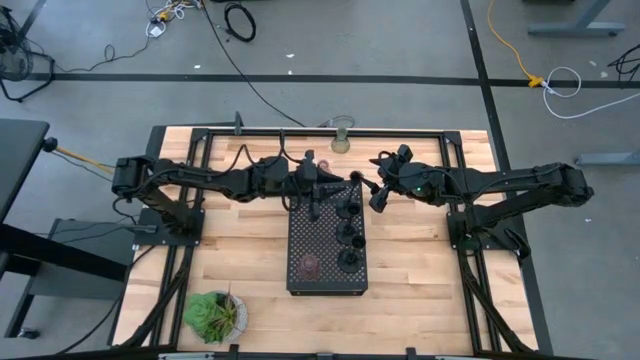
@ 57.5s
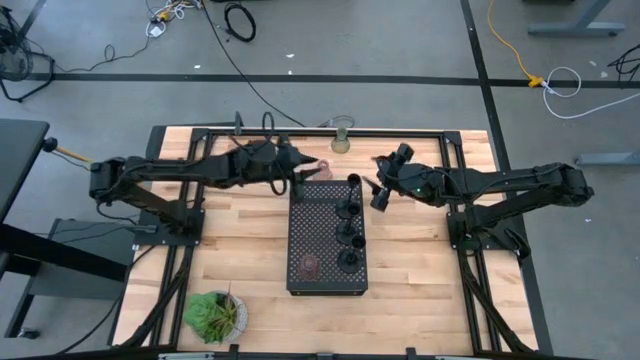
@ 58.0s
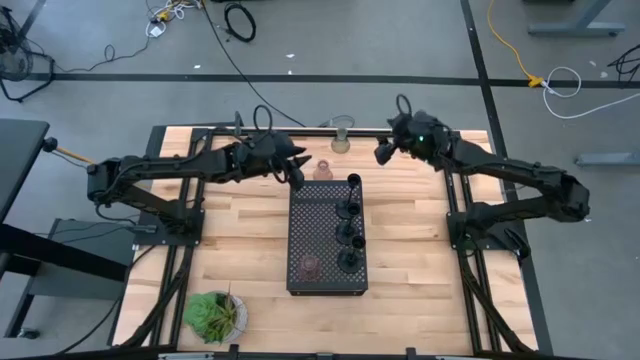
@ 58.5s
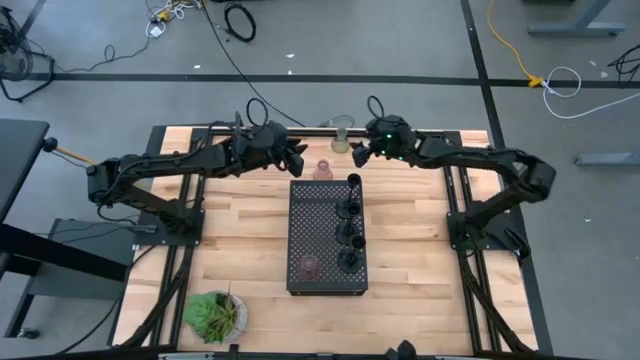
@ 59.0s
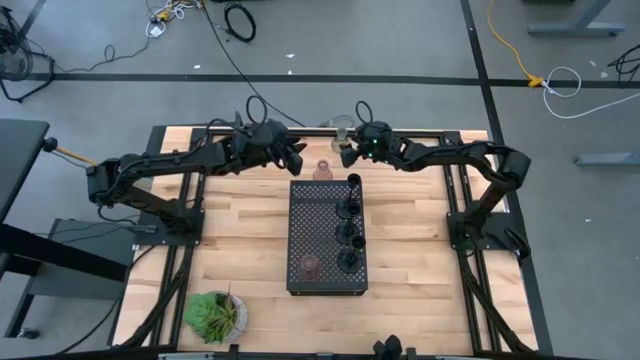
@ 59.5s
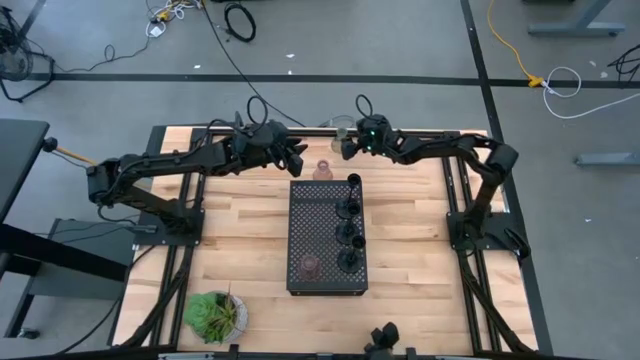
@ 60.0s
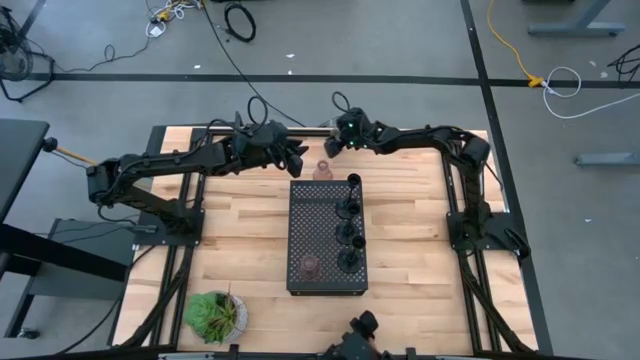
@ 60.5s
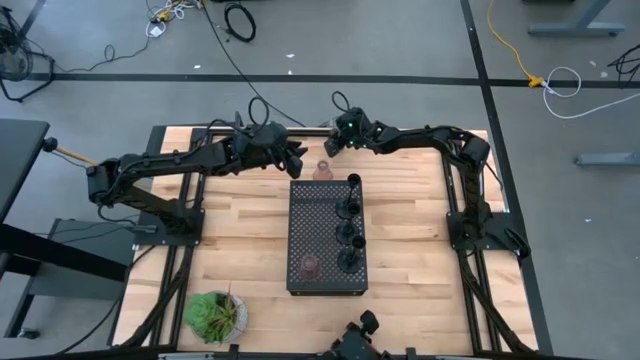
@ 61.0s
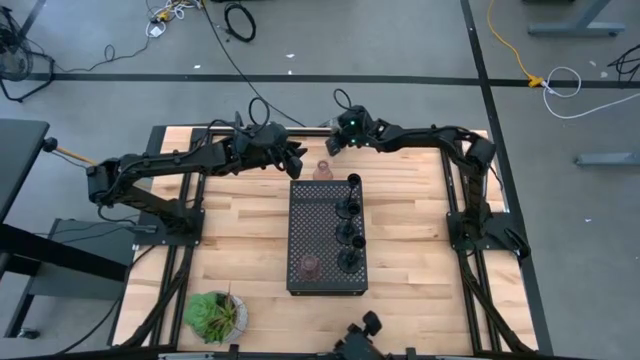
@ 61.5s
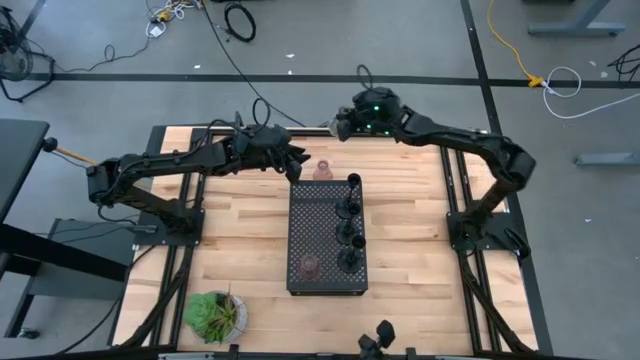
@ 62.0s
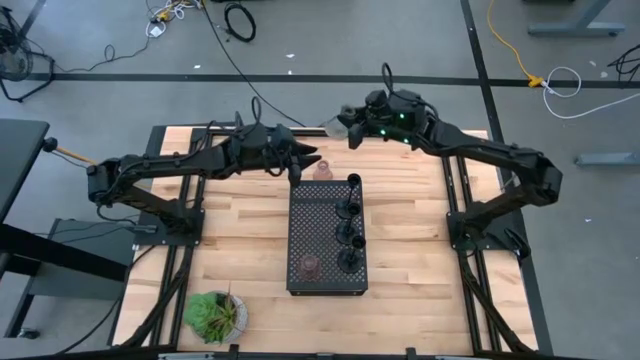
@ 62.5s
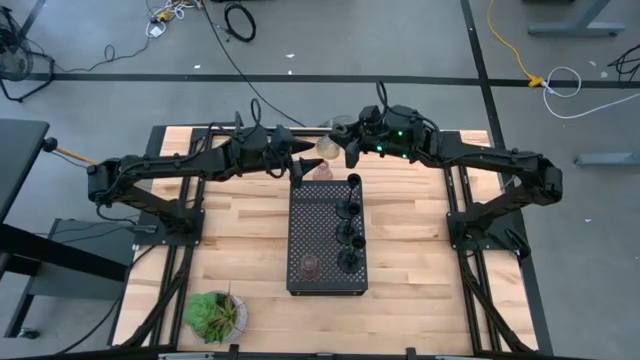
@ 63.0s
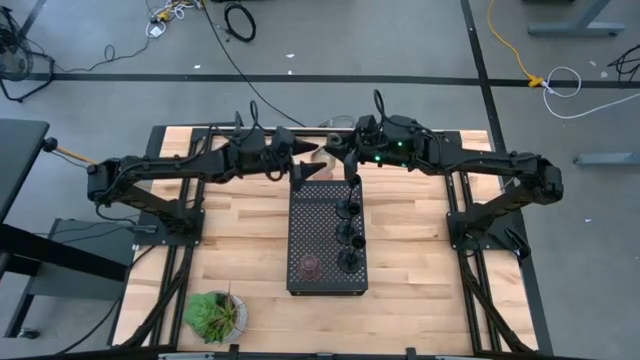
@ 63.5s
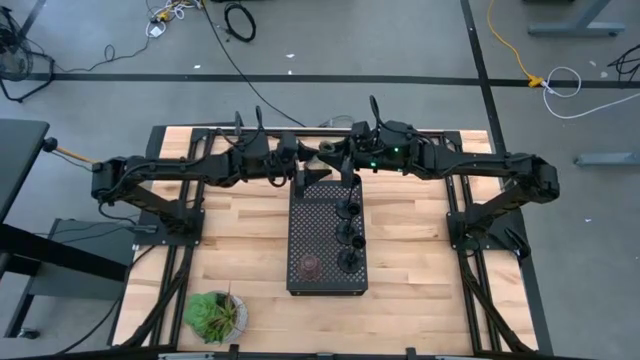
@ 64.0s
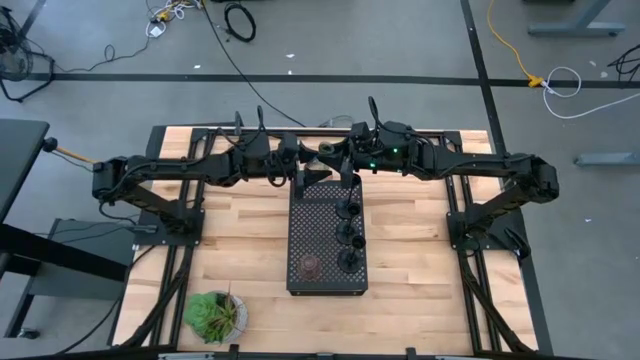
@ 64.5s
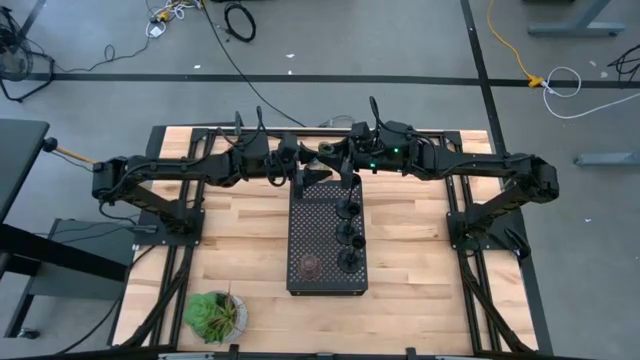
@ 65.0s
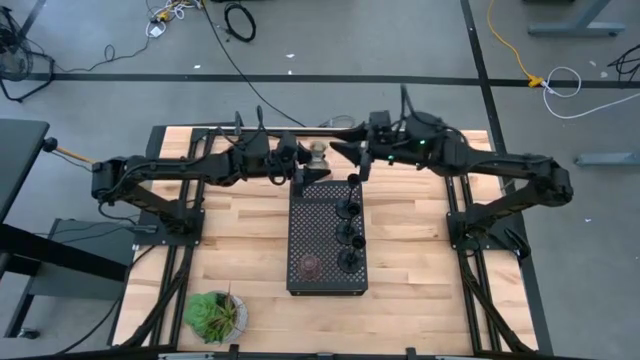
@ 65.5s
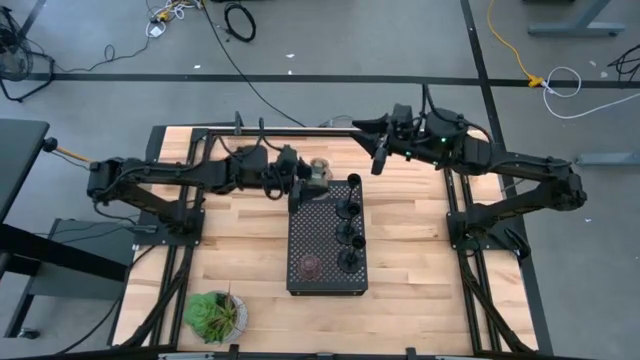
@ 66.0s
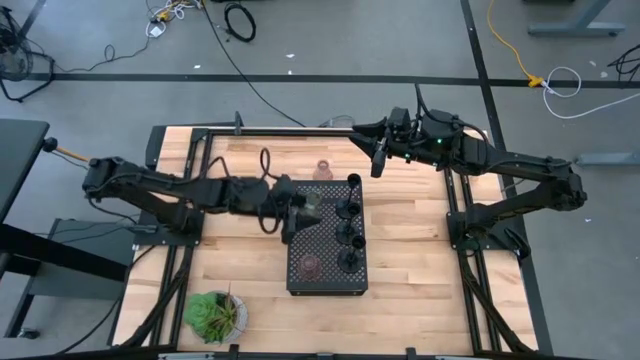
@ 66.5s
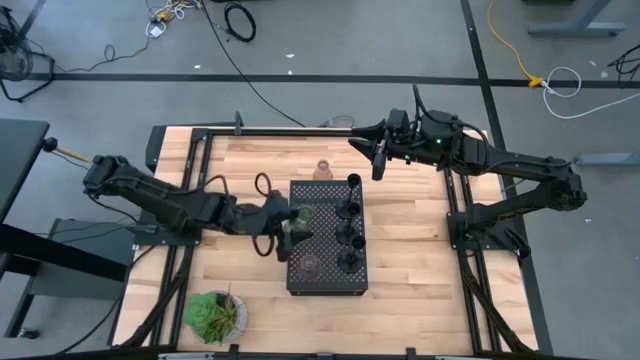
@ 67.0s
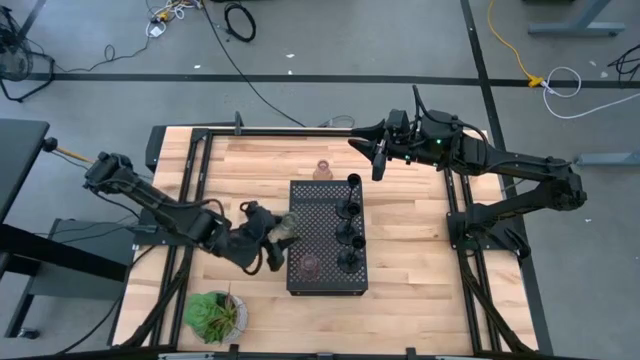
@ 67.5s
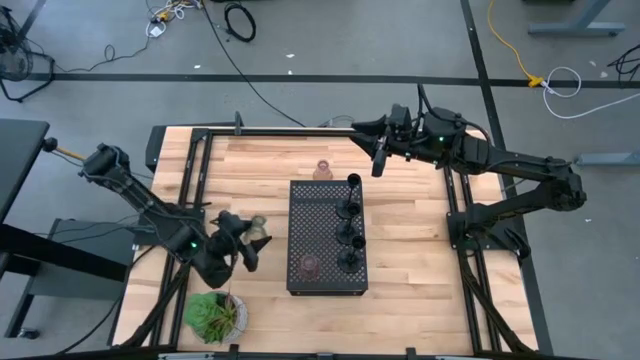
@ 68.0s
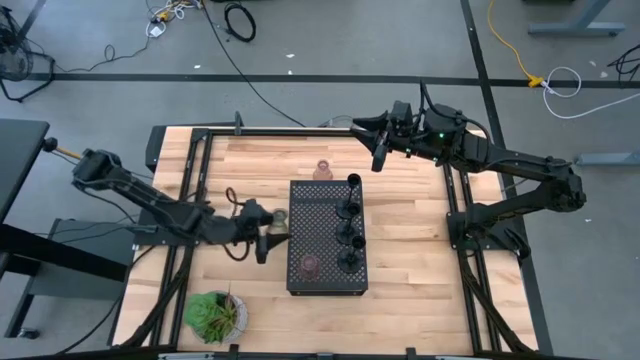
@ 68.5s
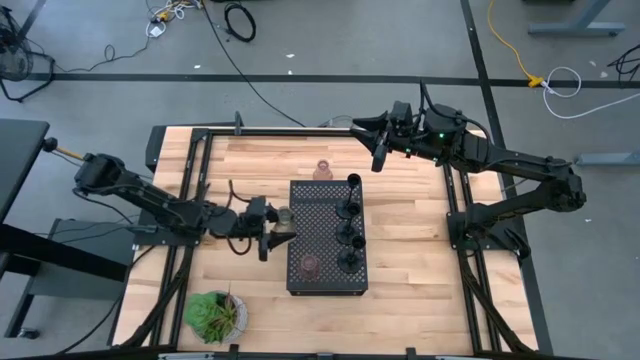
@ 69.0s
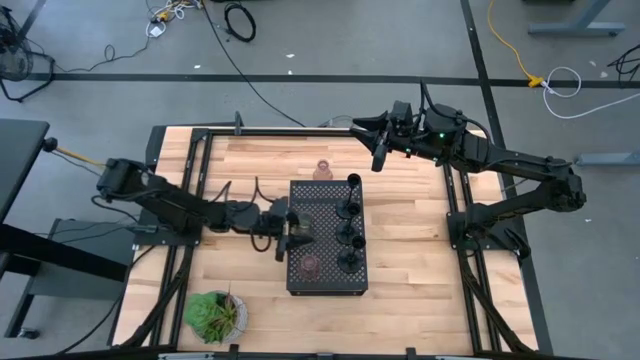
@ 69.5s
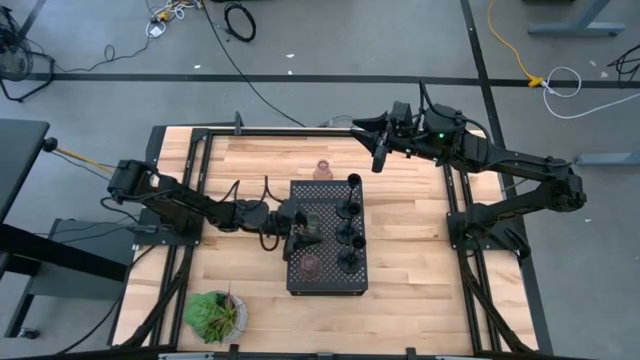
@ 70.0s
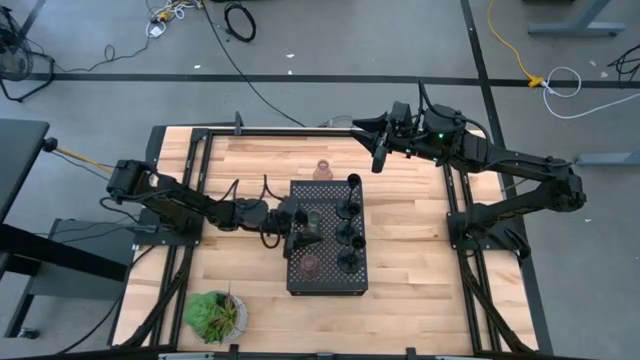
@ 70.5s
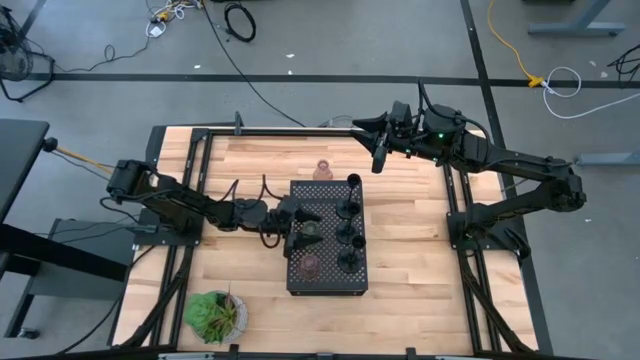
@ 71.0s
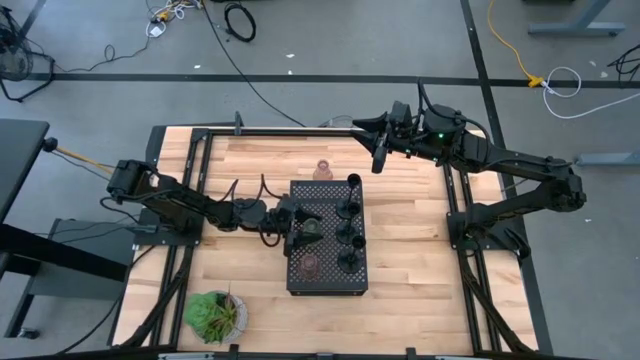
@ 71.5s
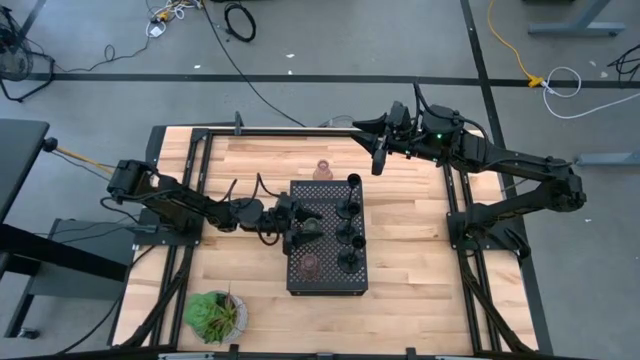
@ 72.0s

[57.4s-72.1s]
Task: Pick & Place candle stick holders
Put the green glass candle holder on the shelf

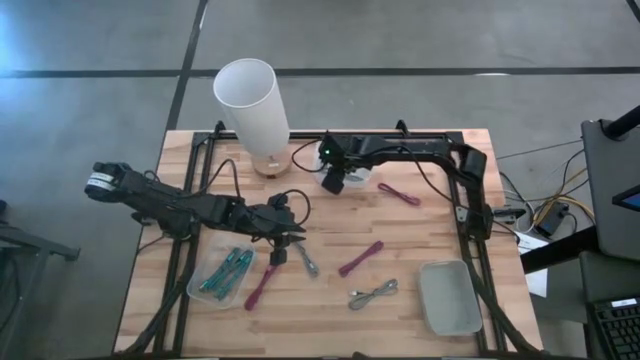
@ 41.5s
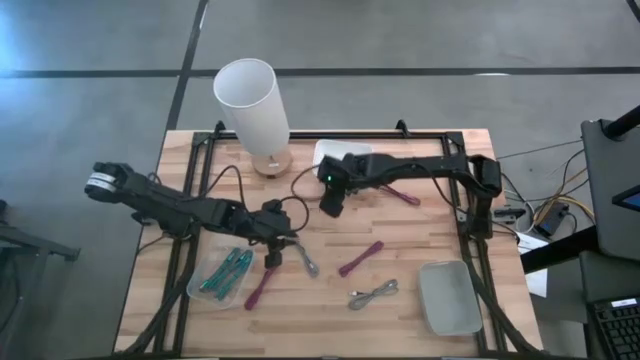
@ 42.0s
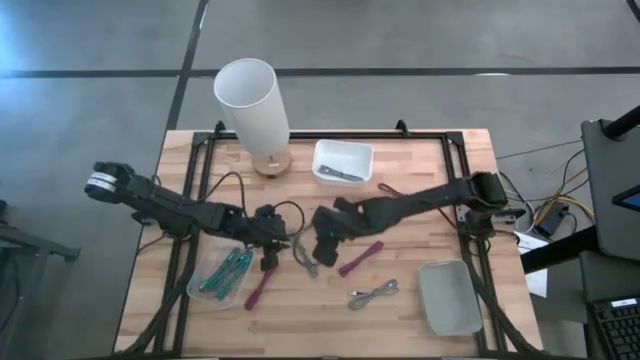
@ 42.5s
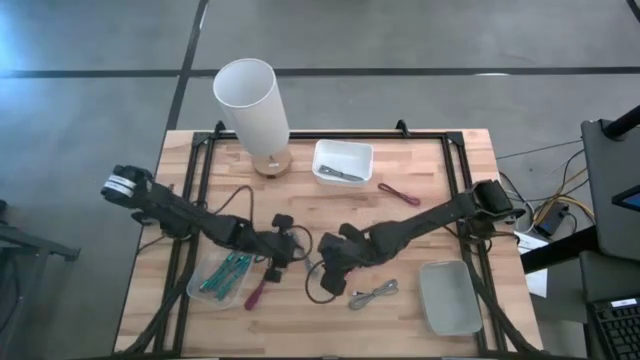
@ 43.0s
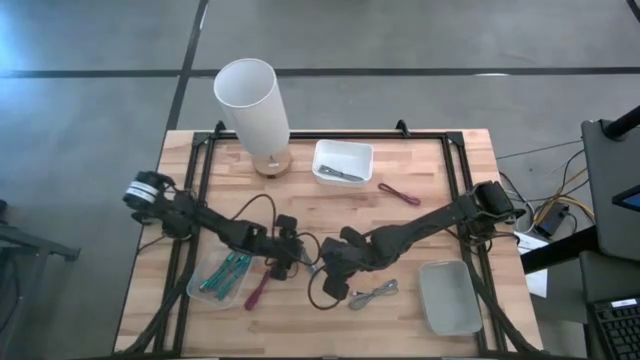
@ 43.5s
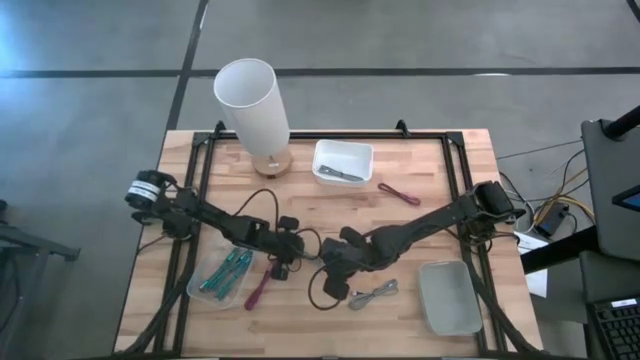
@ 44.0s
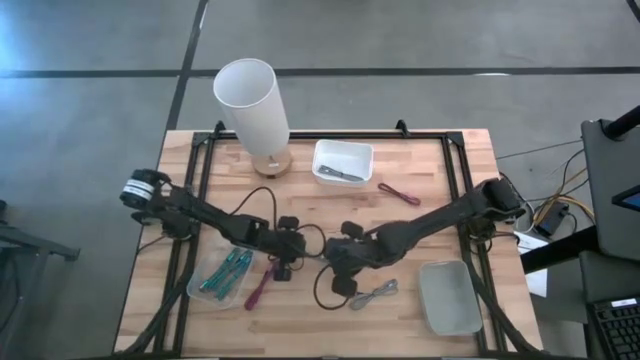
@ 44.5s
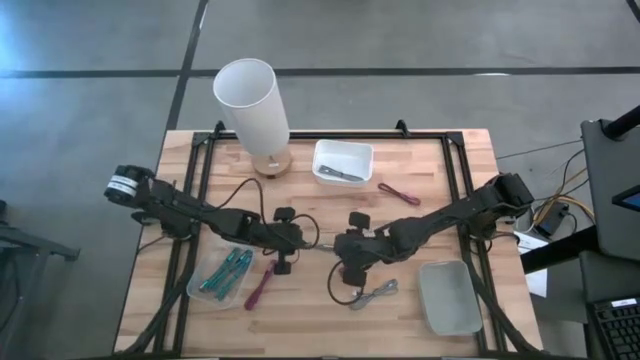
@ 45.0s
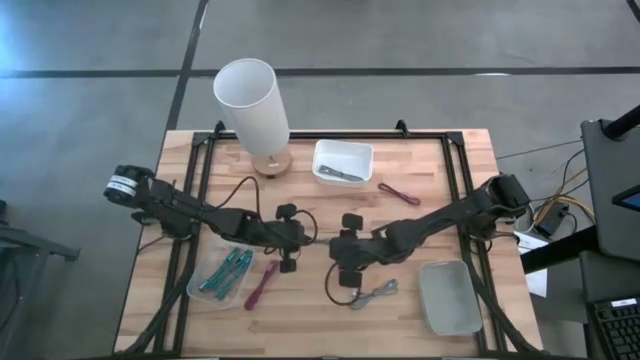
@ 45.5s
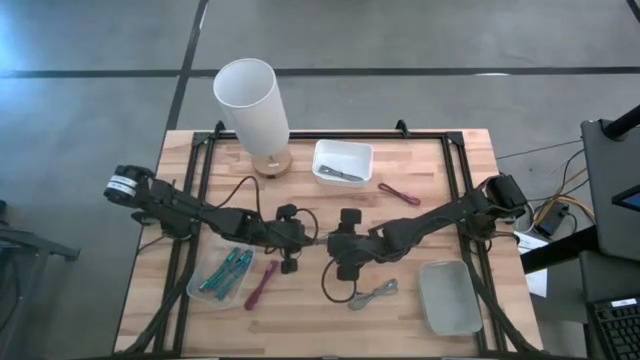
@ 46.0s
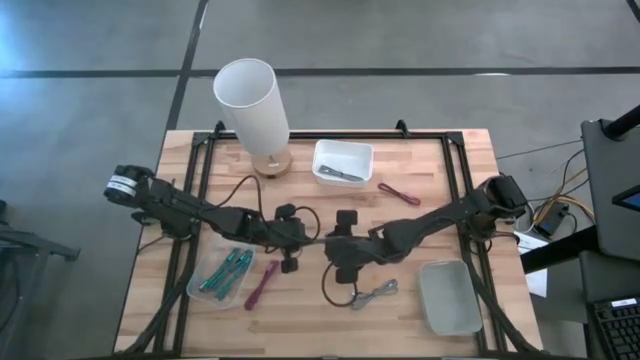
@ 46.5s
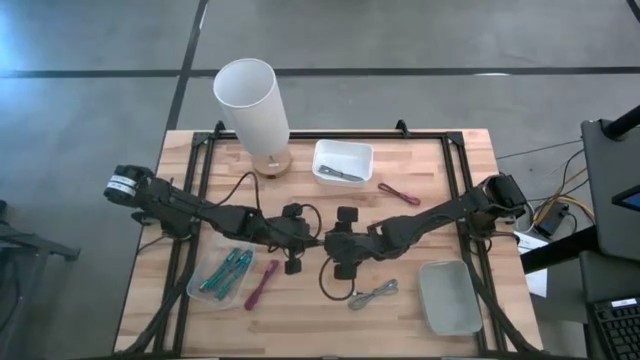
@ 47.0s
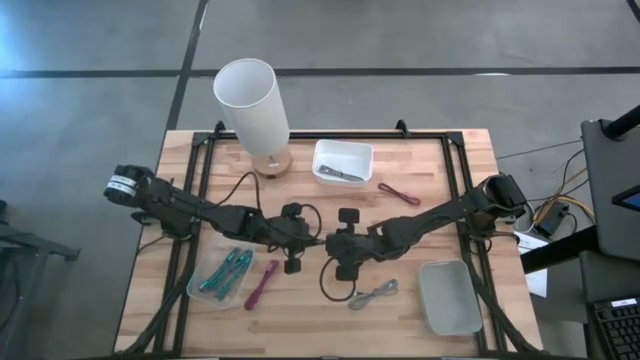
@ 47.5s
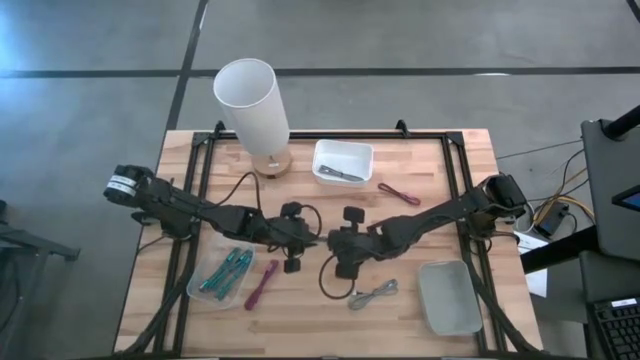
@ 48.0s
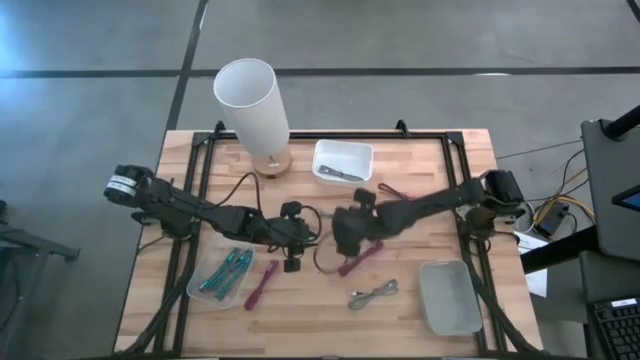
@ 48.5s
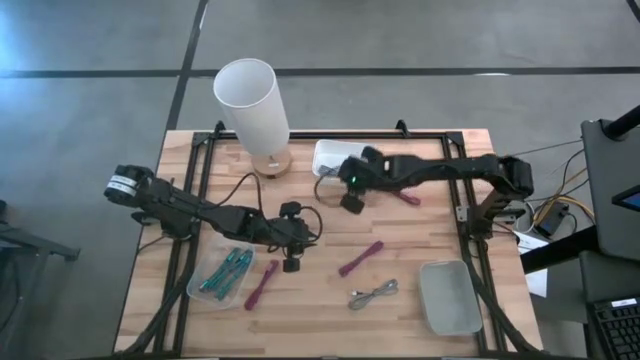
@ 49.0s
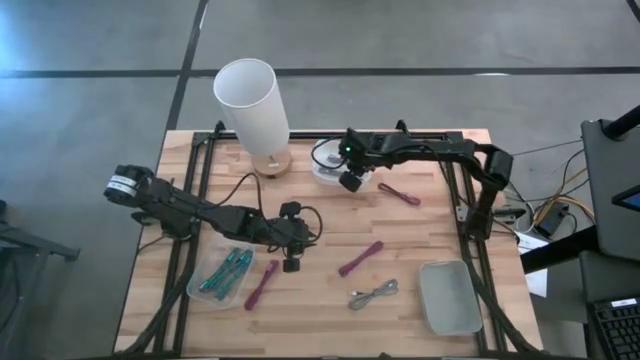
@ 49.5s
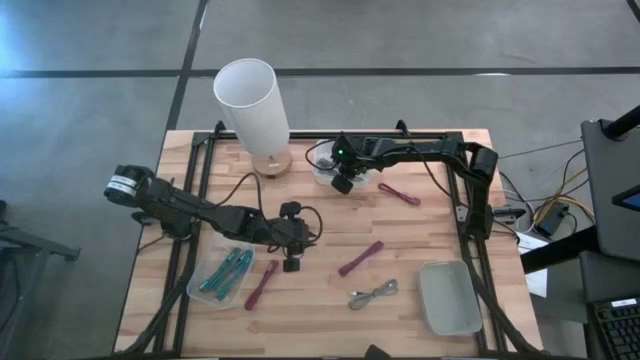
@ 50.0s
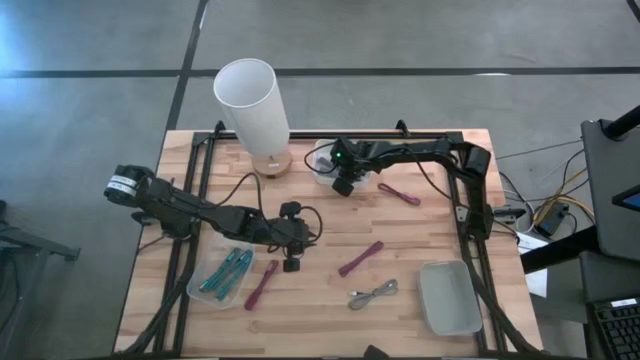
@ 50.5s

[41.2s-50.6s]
Task: Pick & Place USB Port
Put the top white black charger cable into the white bin
